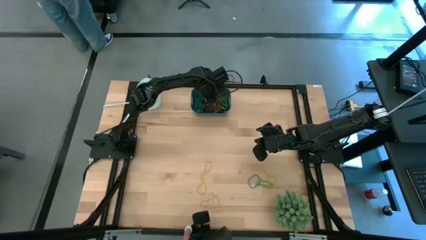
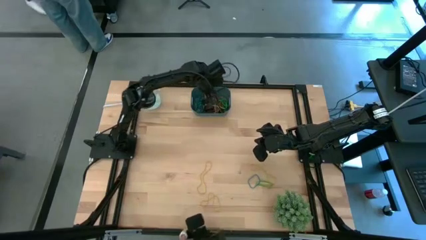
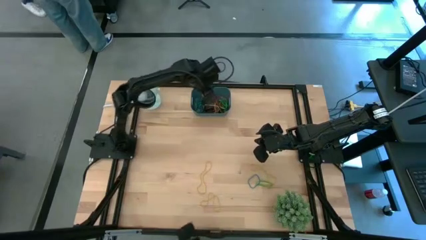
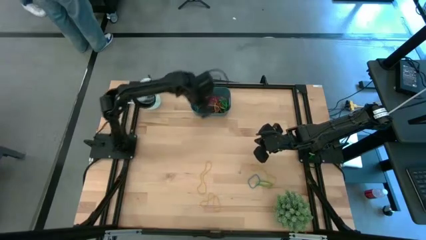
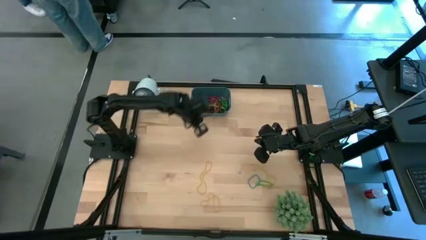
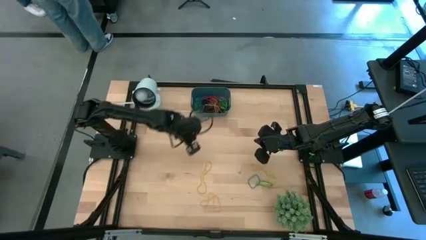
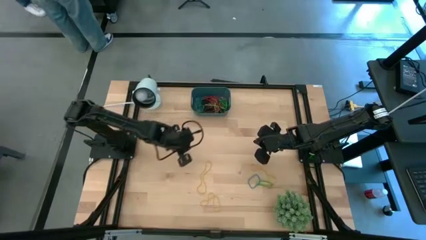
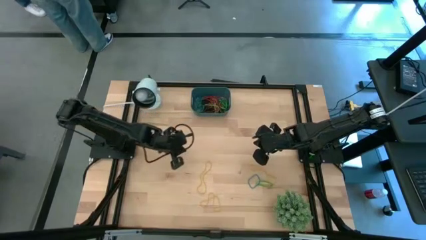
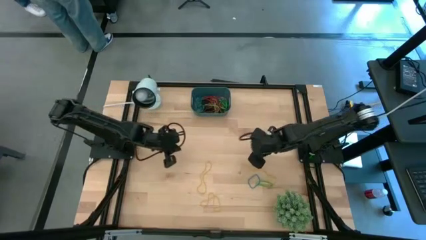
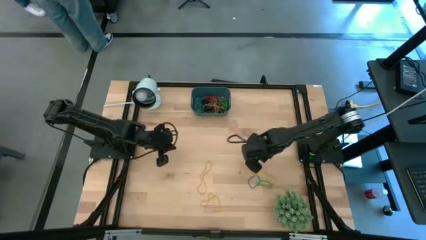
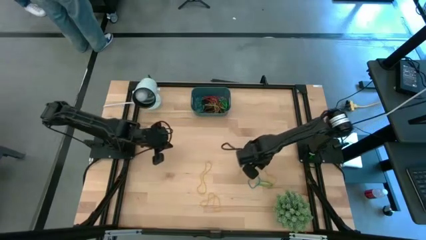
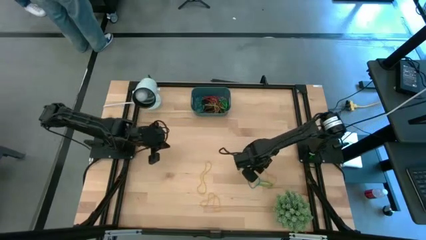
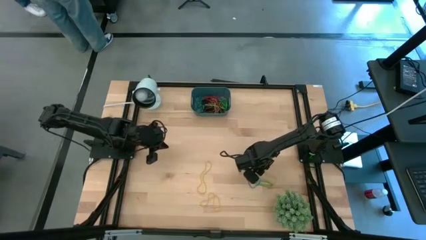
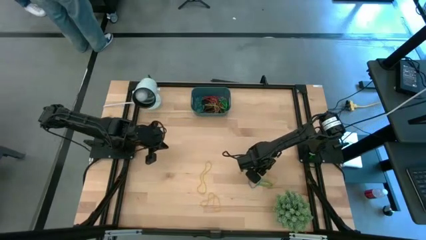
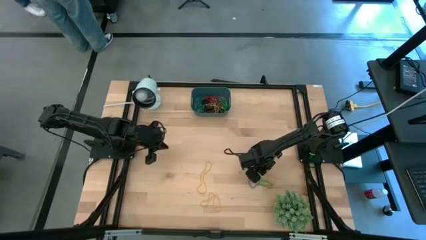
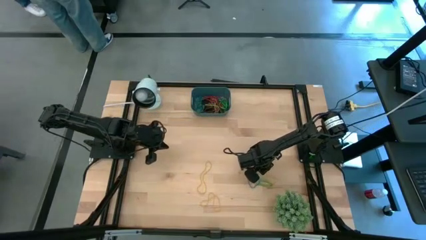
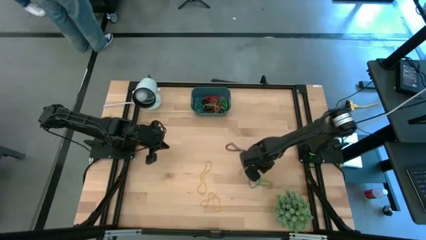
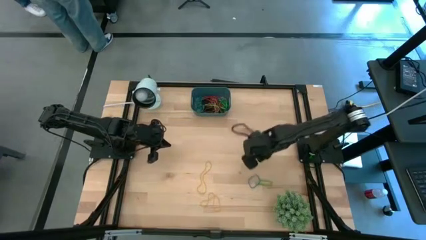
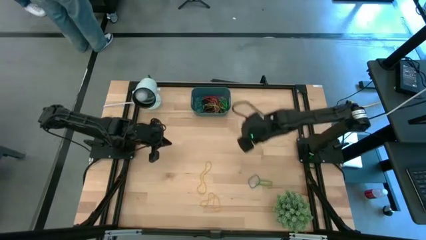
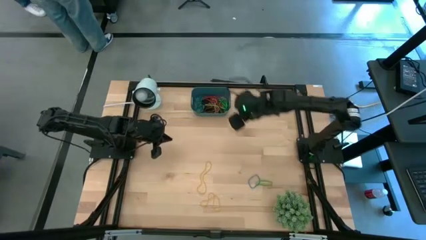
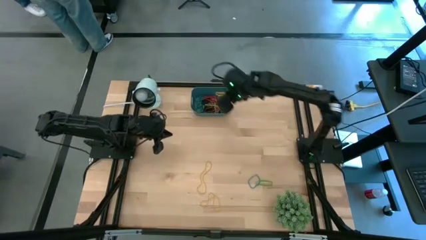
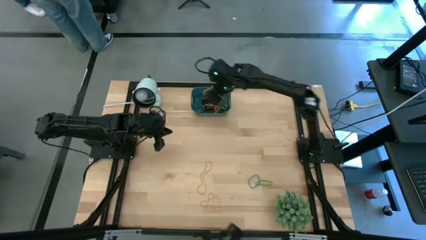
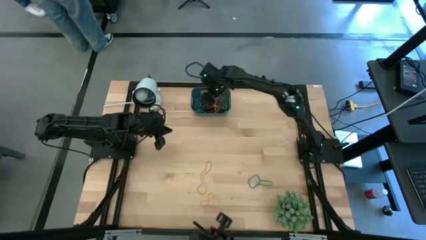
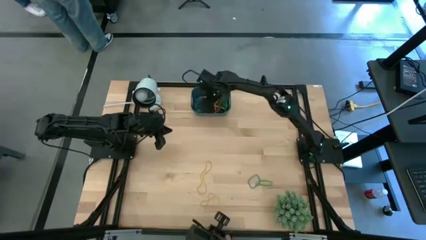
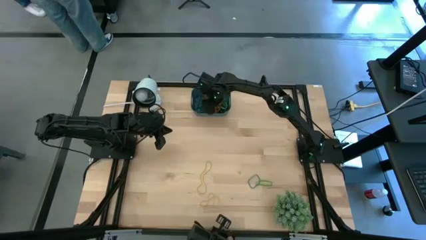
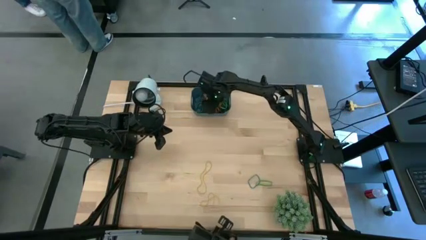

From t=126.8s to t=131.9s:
Task: Pick and place rubber bands into bin
Put the yellow rubber band into the blue bin

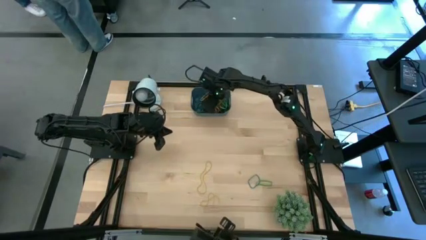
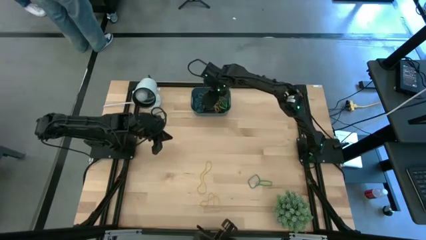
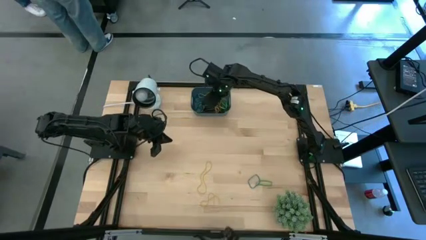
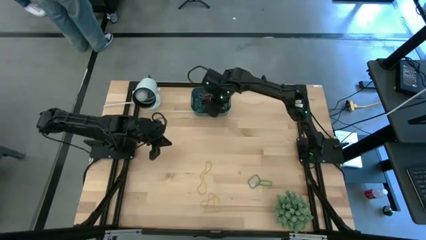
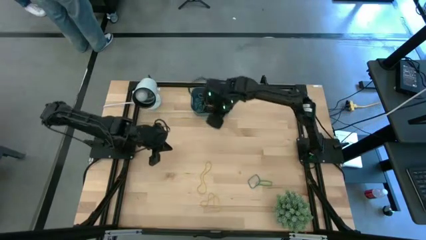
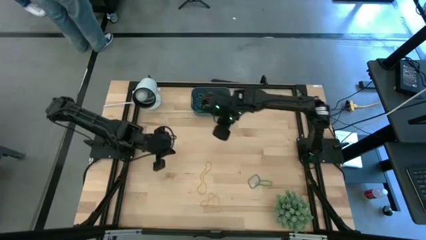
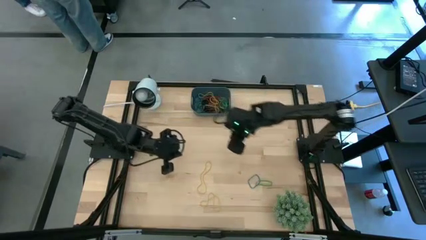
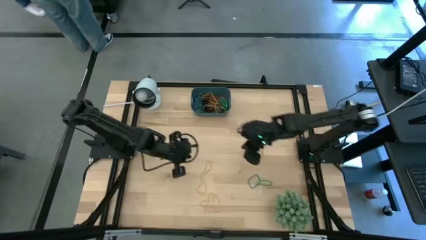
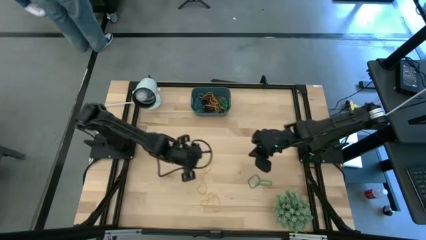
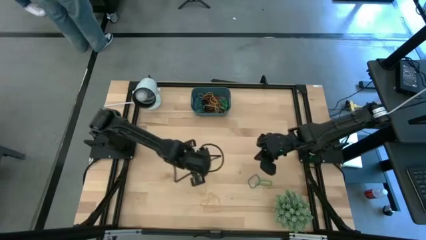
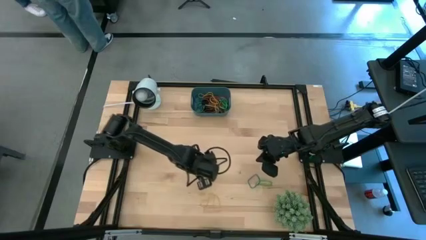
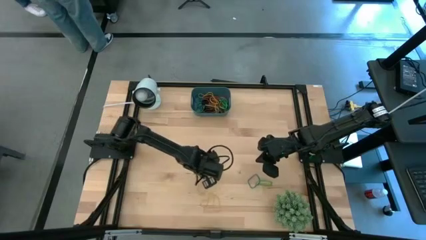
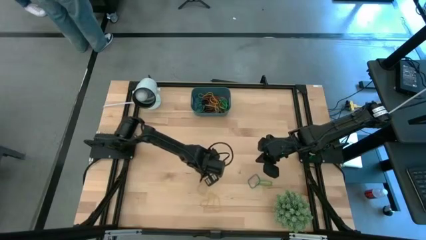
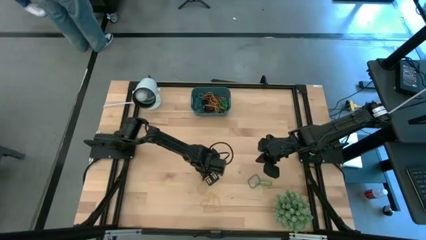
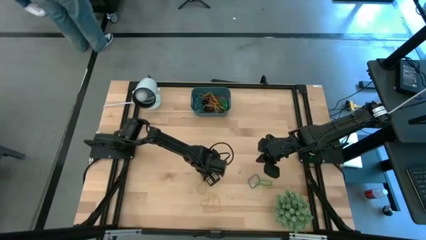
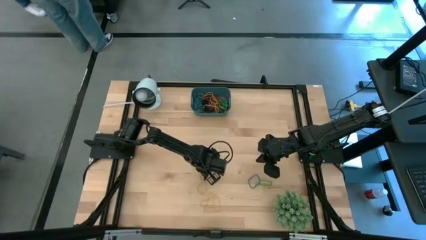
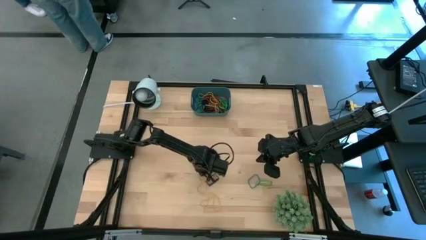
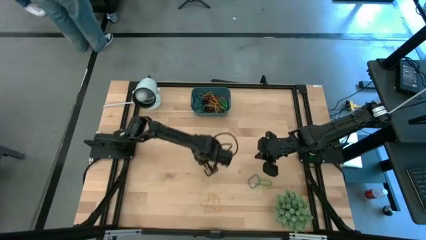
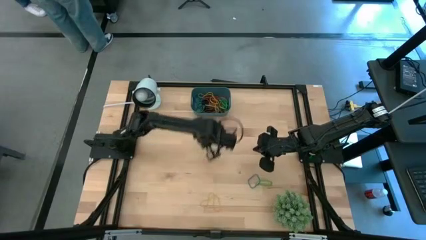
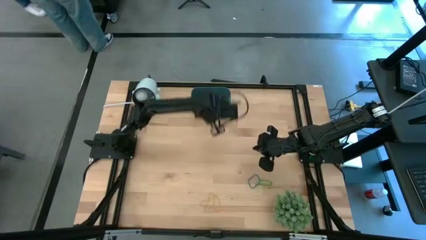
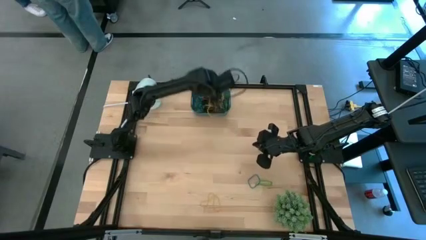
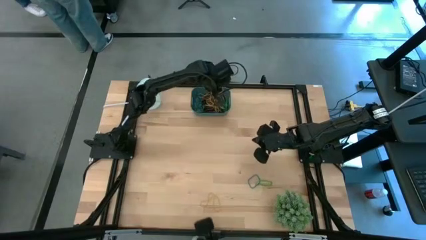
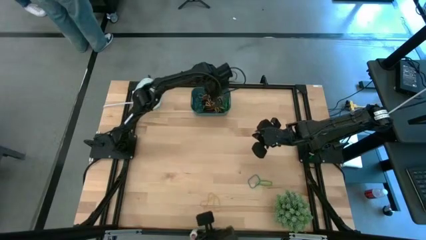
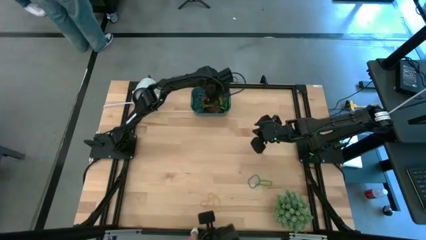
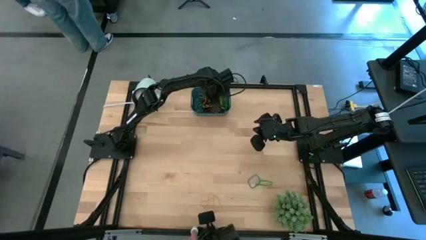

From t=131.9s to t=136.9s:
Put the yellow rubber band into the blue bin

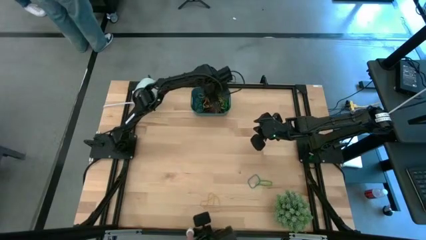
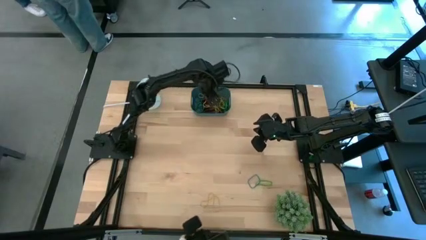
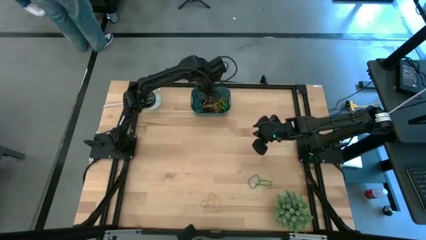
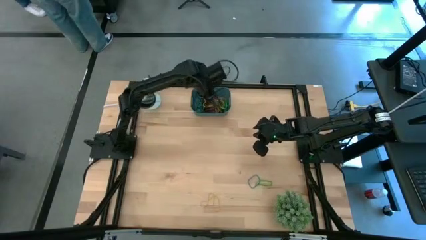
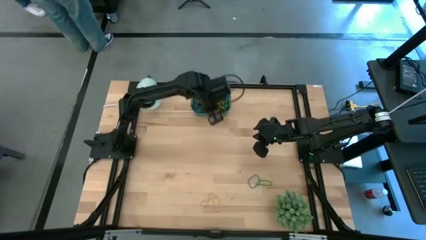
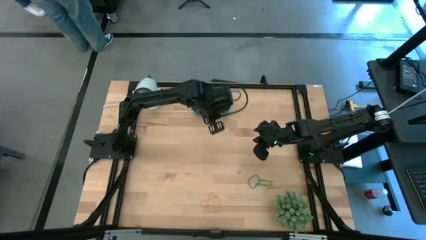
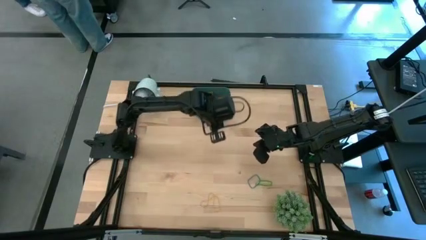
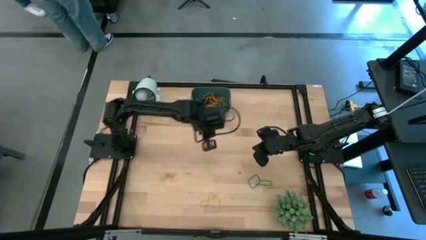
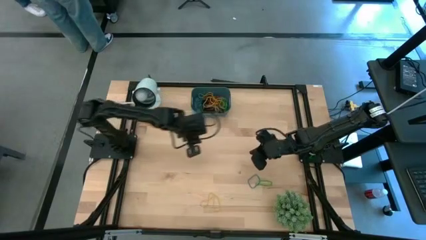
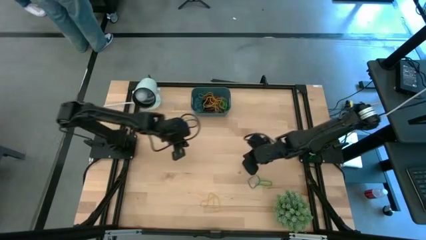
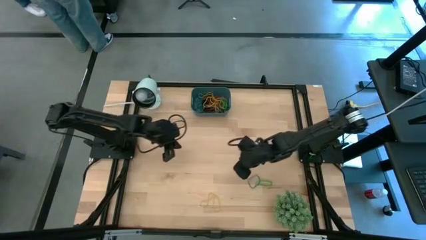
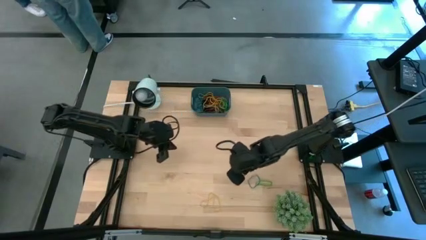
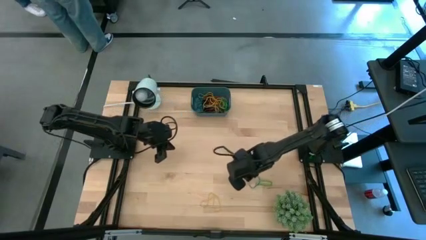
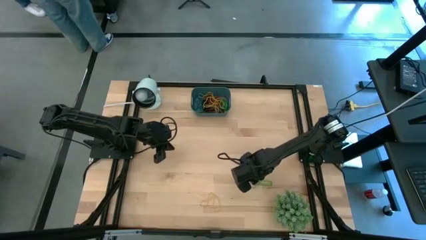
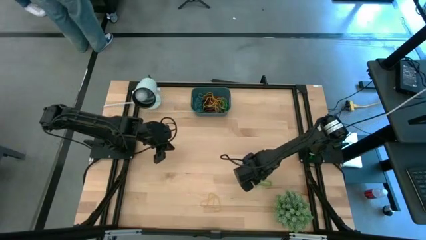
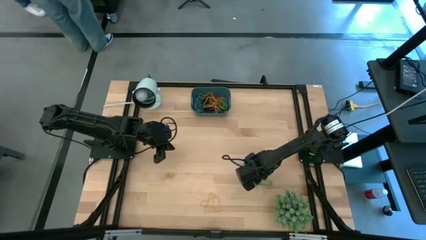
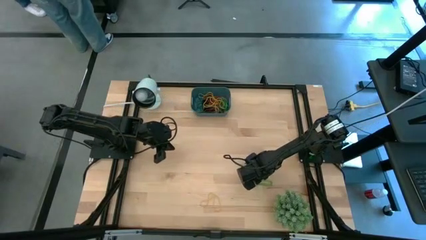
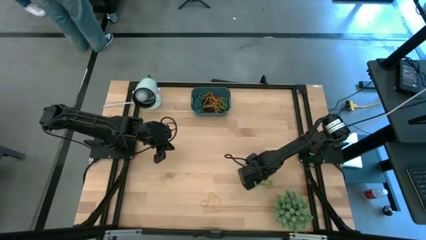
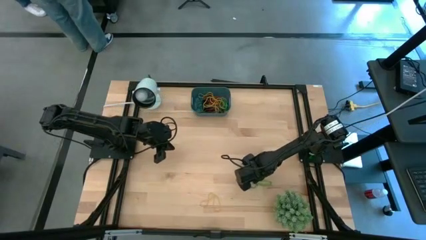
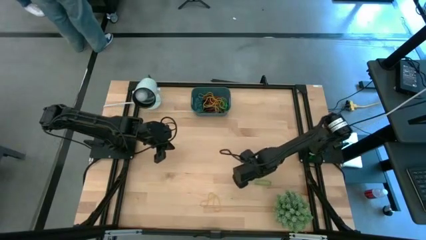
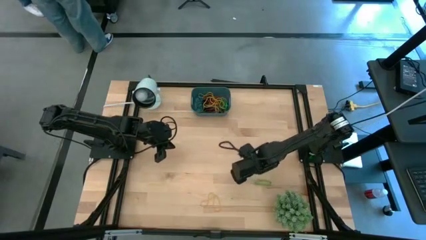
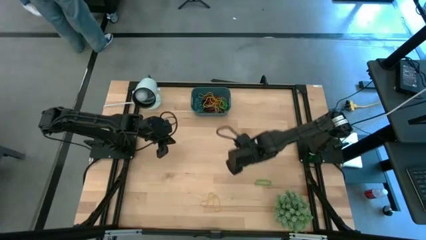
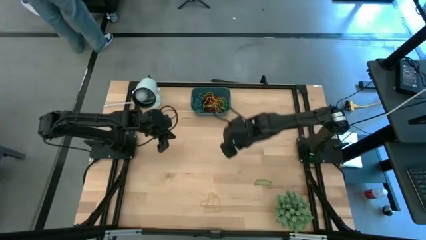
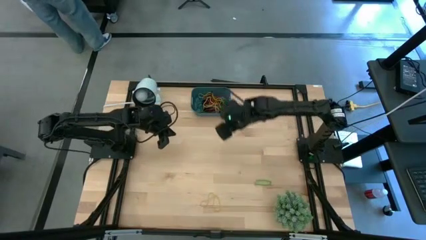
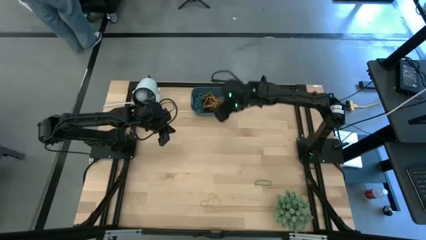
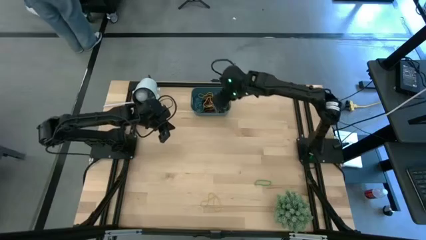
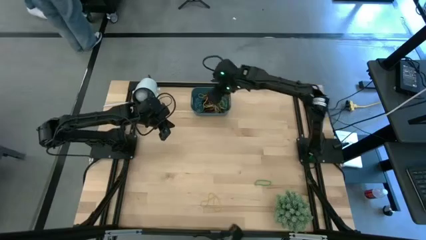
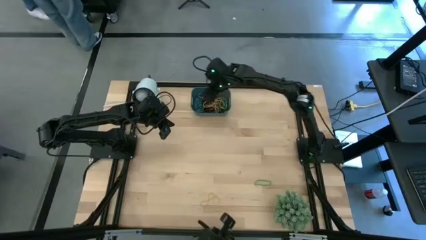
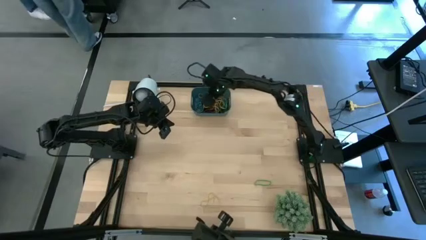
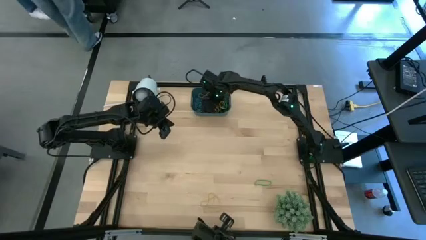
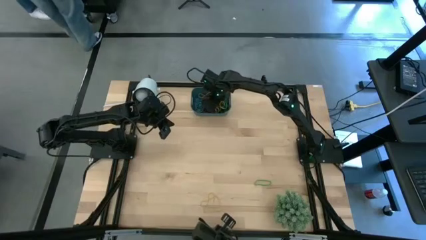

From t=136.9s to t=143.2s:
Put the blue rubber band into the blue bin
